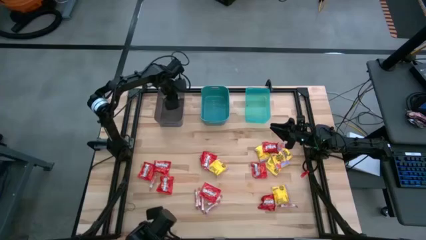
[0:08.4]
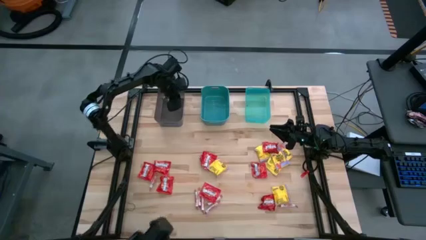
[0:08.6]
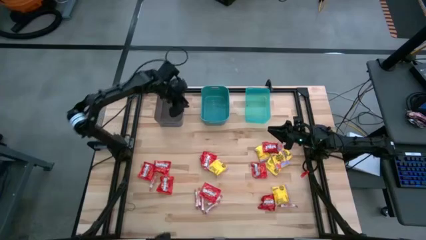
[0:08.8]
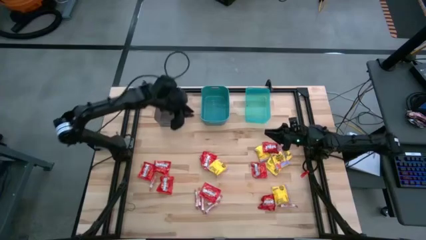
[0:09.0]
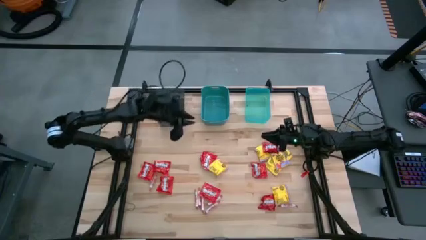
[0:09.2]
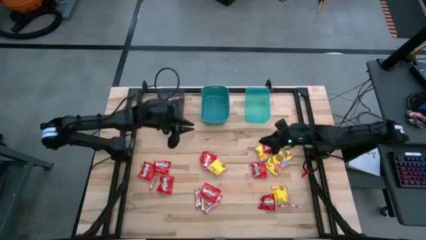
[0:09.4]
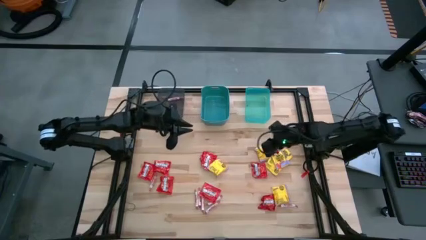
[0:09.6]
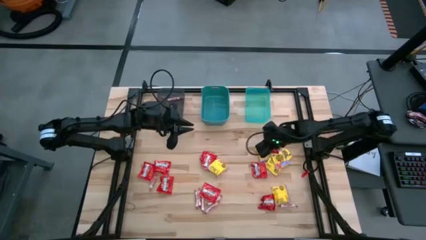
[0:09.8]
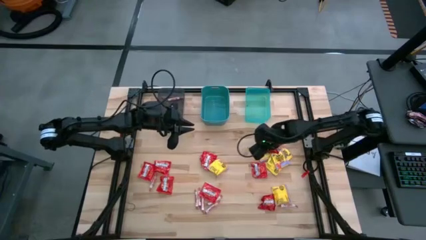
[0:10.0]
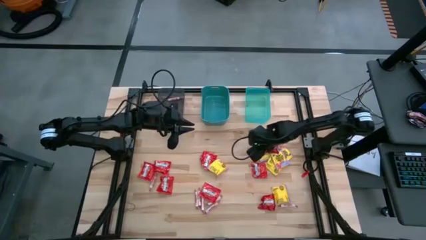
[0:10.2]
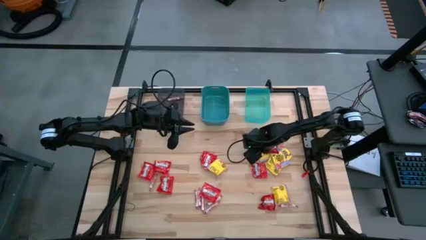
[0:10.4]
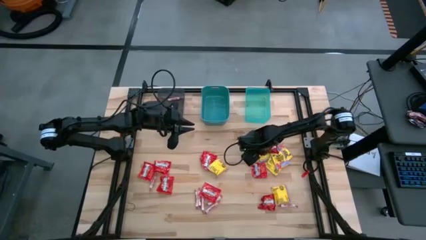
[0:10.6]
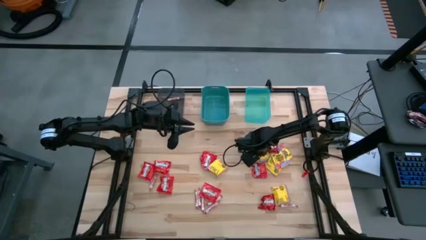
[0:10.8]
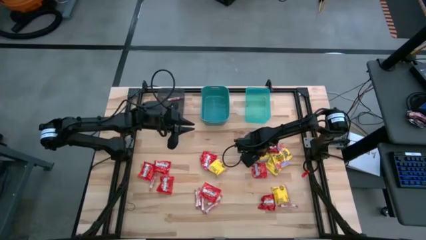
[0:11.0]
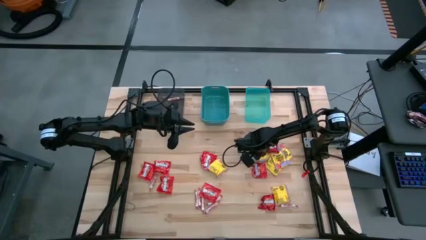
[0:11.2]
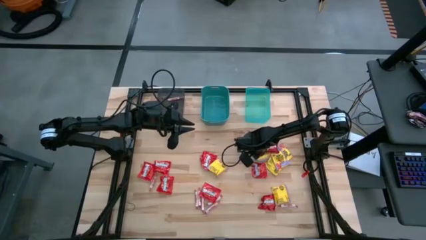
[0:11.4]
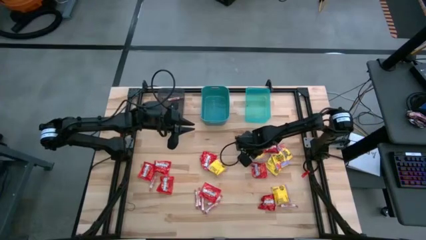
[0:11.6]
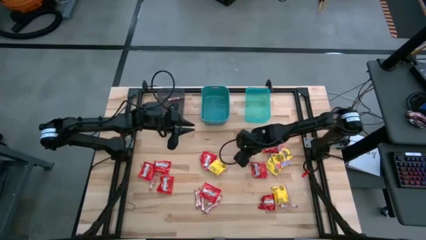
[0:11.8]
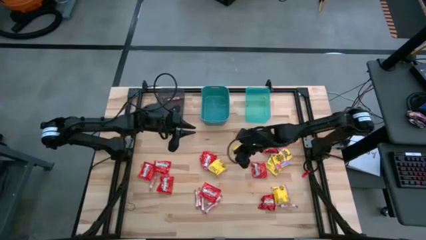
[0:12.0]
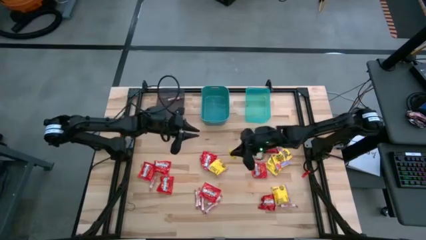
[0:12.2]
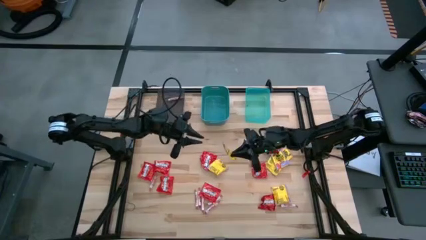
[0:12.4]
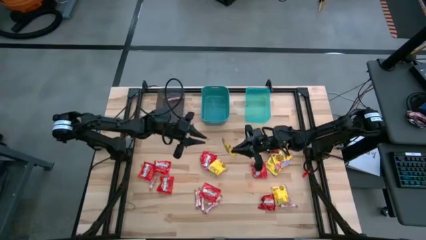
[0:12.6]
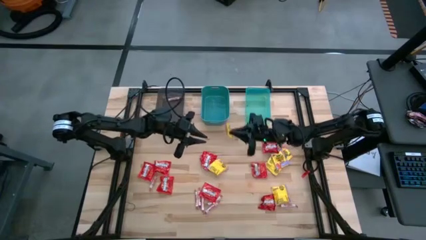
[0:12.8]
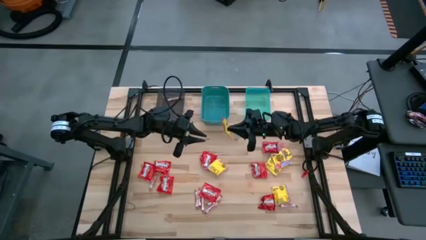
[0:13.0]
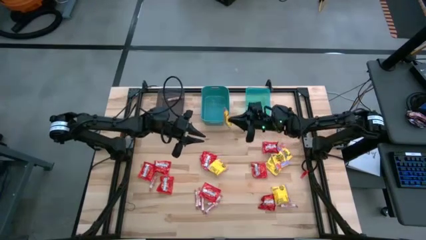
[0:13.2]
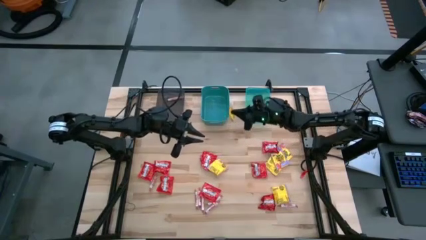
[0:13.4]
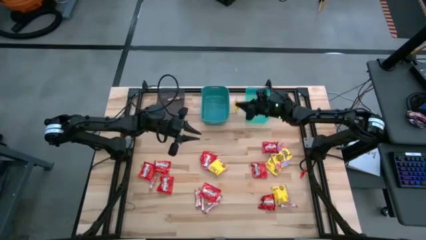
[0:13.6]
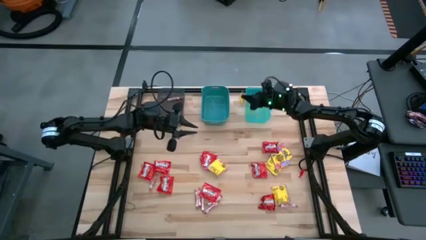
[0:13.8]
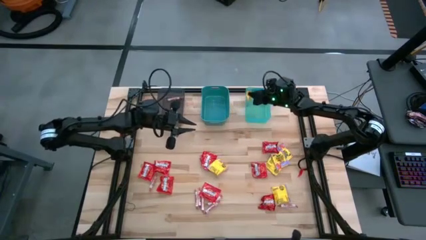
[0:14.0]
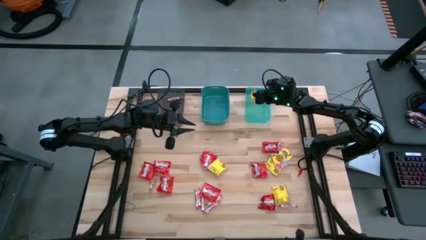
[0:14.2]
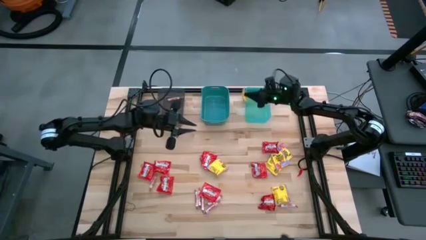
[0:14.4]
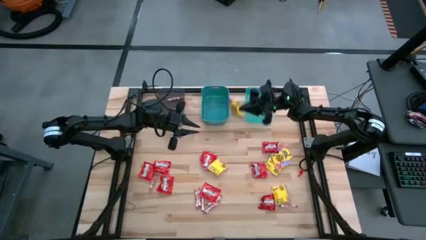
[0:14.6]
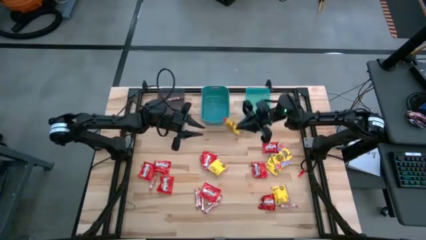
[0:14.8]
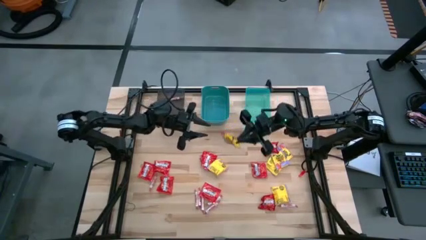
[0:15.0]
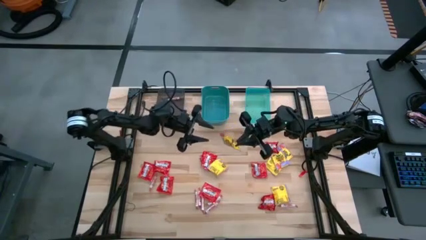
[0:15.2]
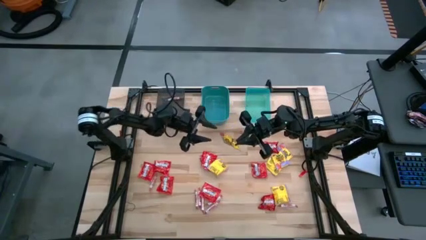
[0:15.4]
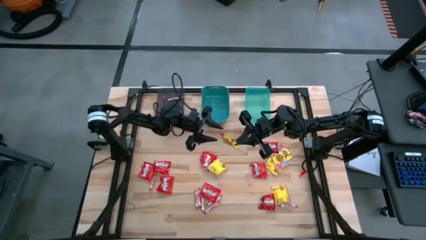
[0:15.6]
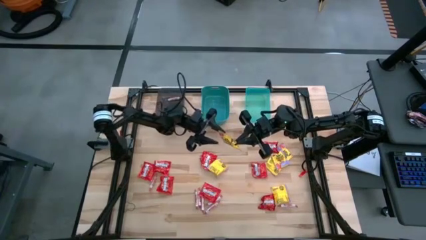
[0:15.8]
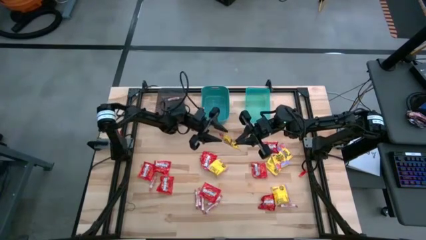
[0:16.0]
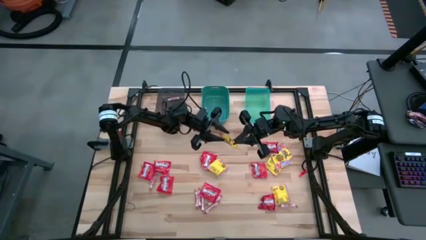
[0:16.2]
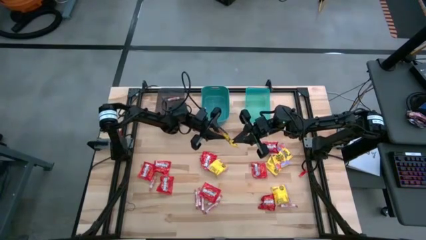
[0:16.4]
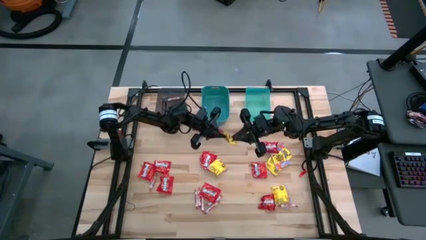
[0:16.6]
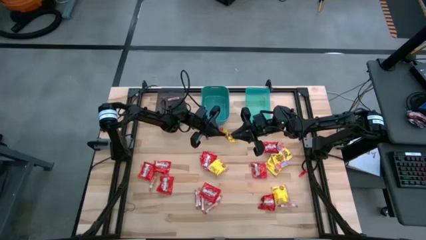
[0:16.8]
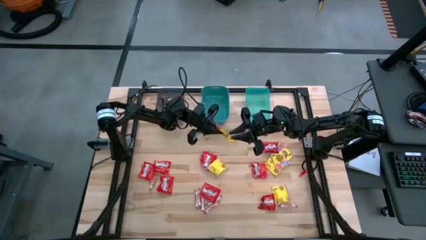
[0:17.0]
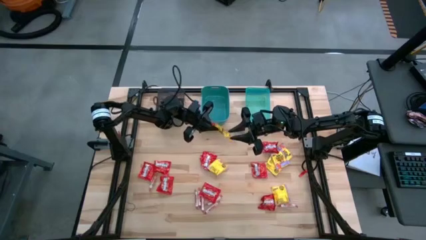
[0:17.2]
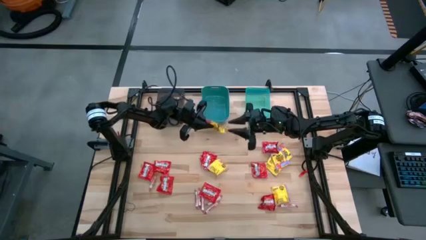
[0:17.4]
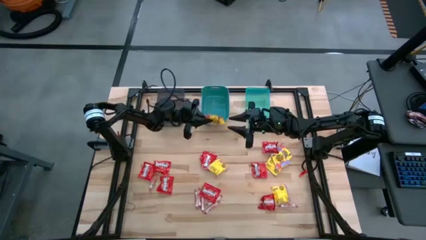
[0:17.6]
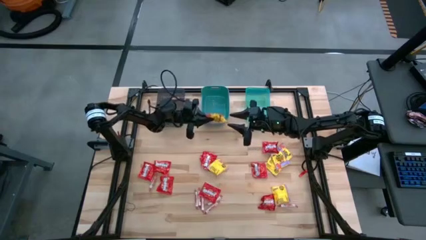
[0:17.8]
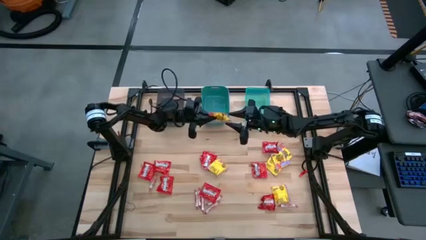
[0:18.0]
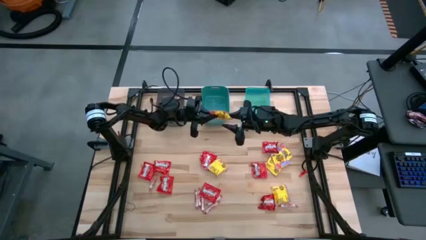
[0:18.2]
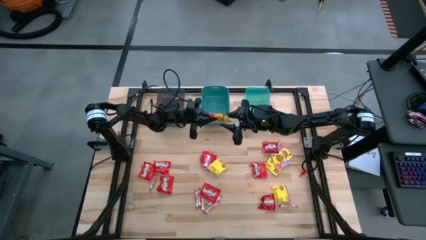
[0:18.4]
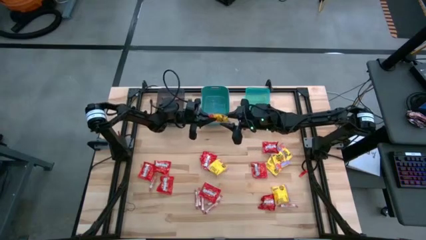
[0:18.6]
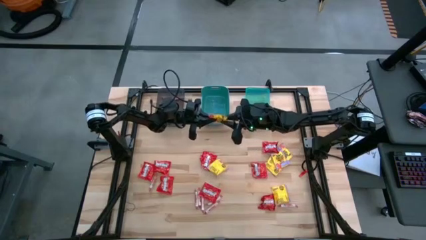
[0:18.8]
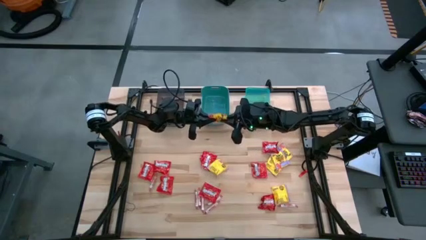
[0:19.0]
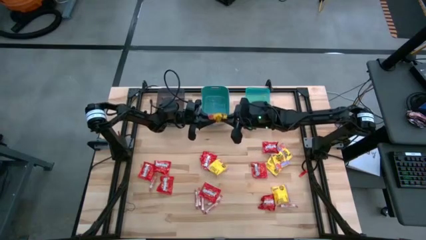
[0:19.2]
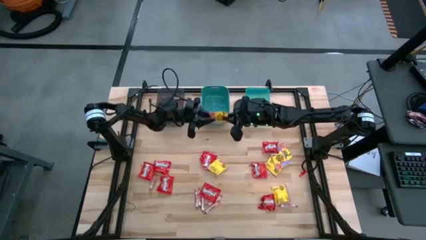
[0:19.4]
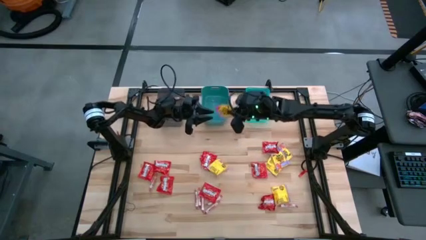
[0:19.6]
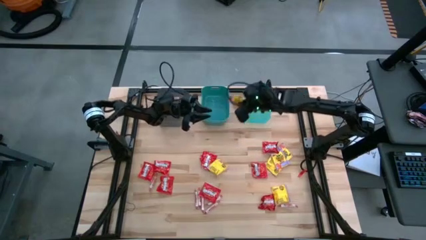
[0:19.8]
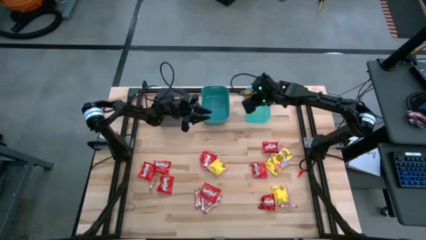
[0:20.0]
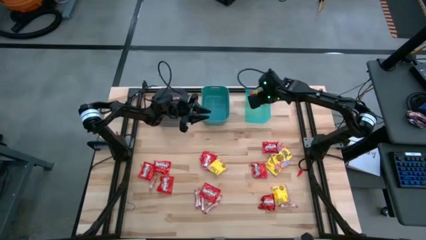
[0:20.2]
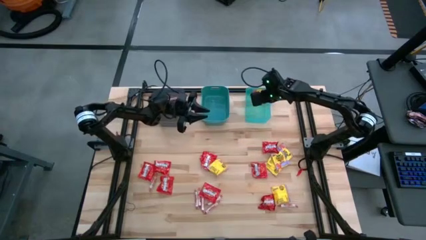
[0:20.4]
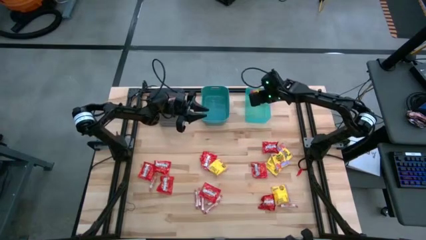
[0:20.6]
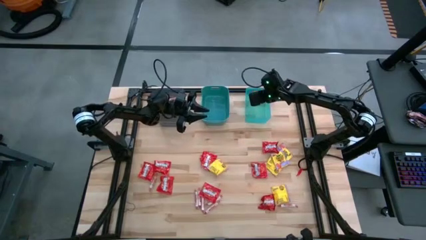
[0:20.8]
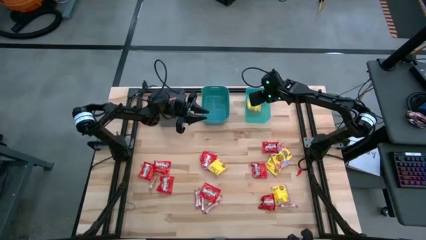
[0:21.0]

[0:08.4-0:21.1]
Task: Sort candy
Put the yellow candy on the light green bin

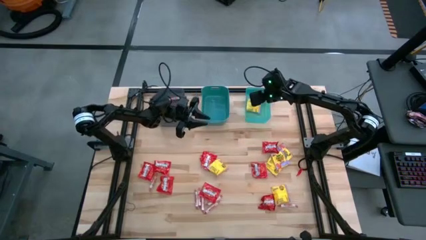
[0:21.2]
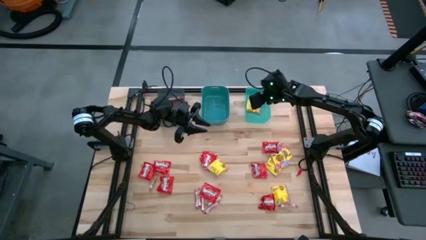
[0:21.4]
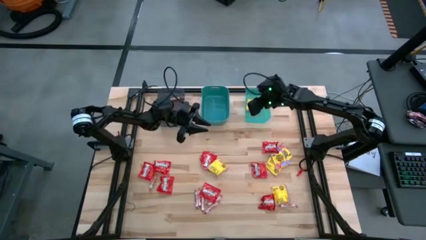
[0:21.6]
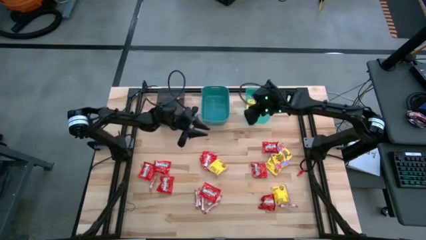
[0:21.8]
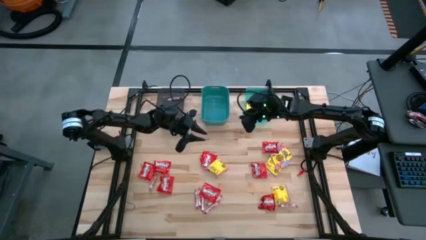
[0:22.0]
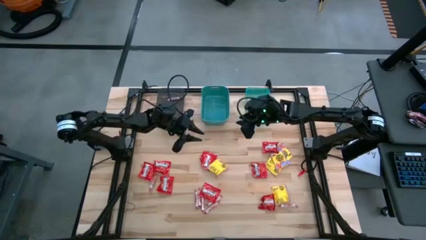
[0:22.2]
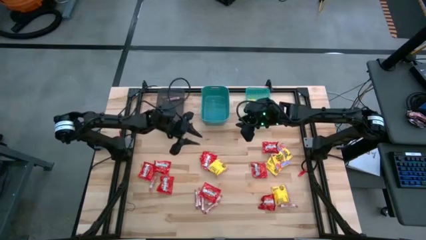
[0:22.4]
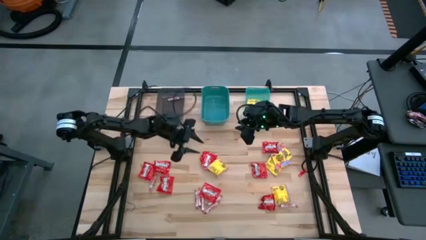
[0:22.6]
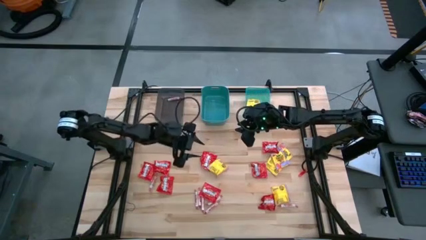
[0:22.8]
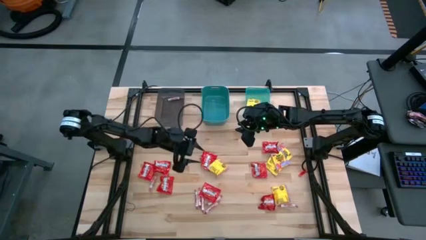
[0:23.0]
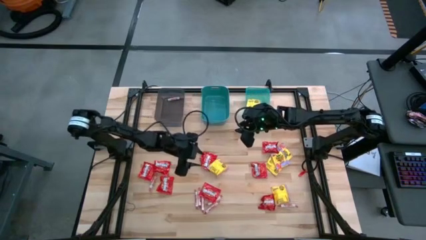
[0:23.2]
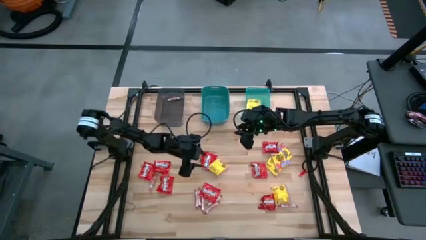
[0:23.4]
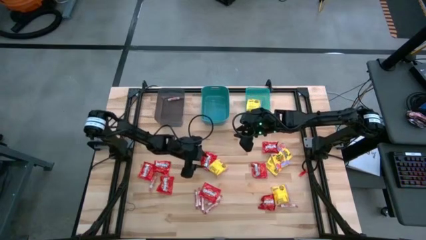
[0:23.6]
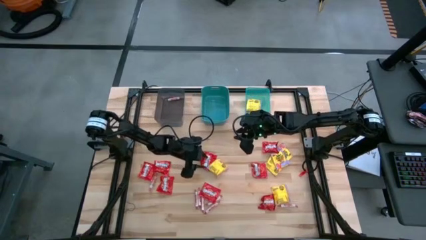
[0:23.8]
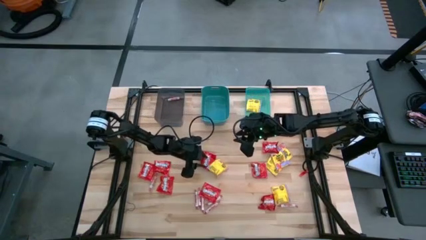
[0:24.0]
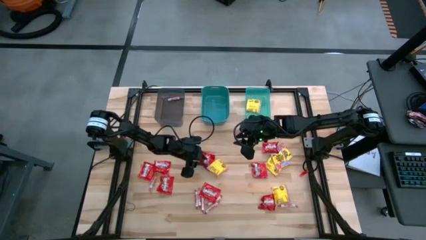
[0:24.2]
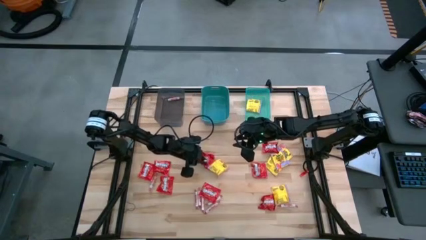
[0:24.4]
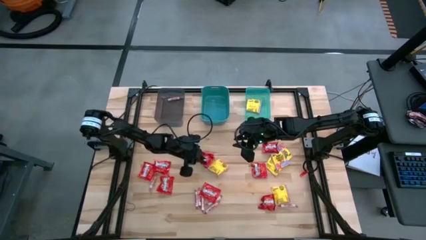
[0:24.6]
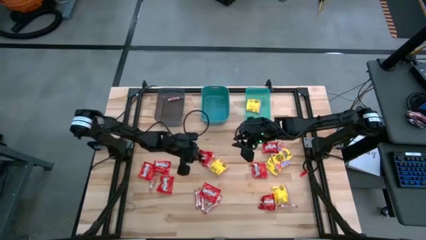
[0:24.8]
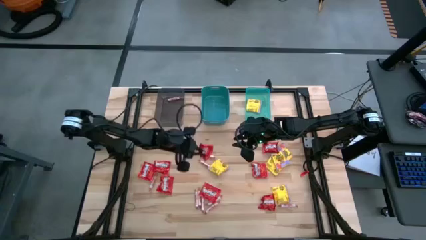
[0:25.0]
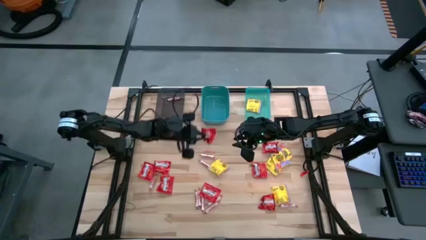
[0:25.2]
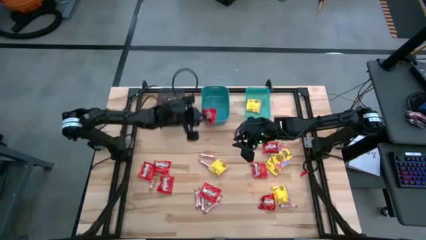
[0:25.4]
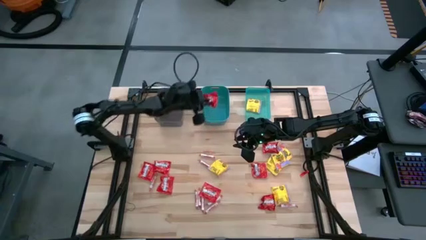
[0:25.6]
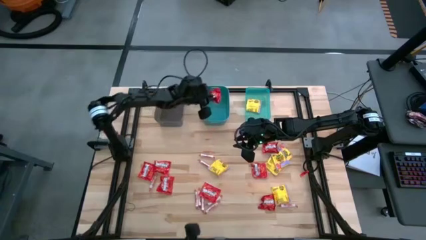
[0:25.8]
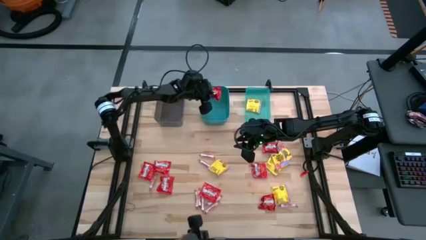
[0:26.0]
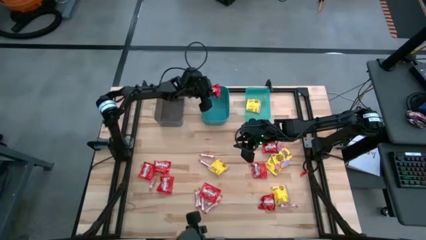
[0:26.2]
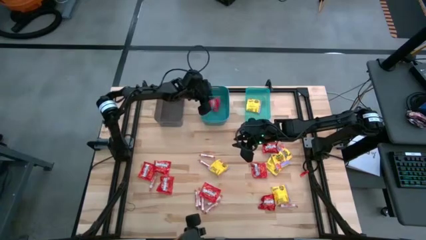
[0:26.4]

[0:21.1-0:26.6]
Put the top center red candy on the dark green bin
